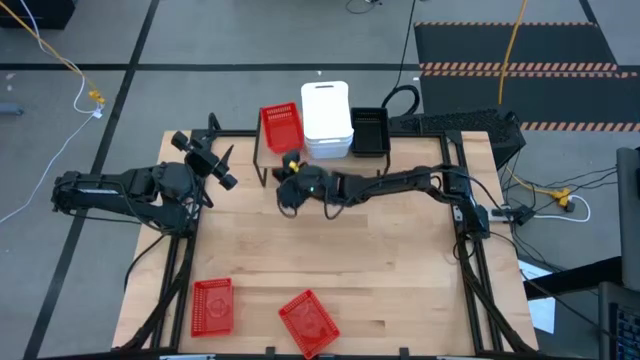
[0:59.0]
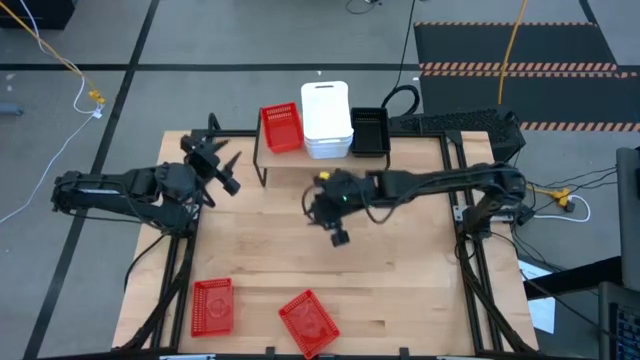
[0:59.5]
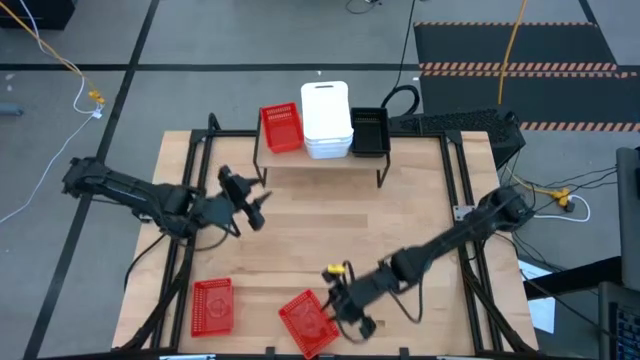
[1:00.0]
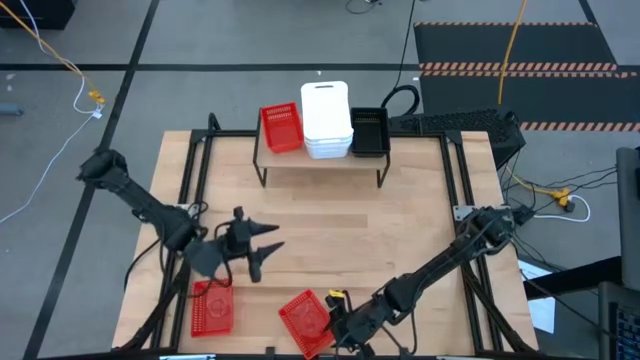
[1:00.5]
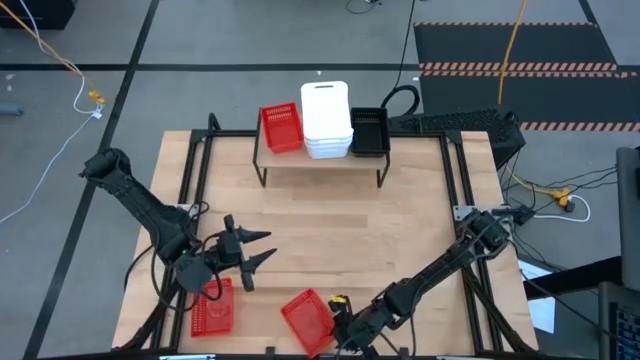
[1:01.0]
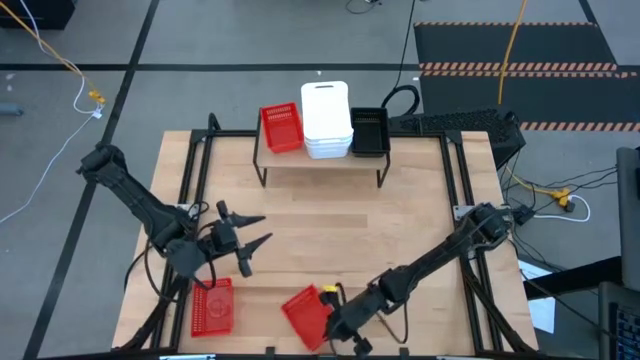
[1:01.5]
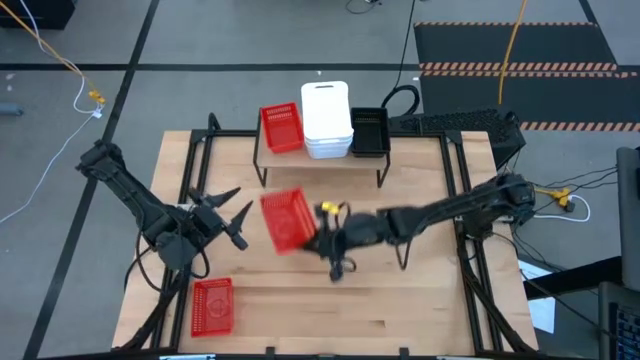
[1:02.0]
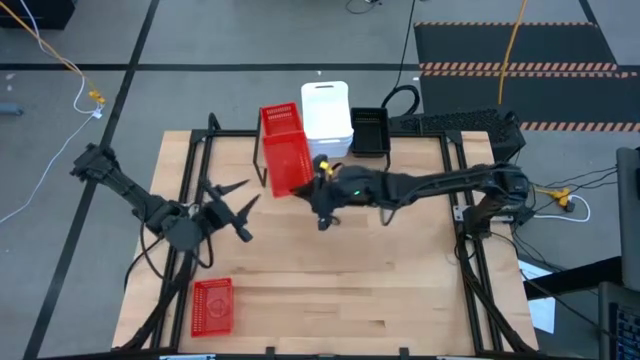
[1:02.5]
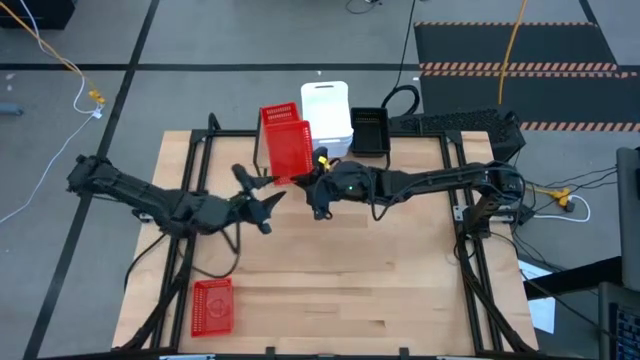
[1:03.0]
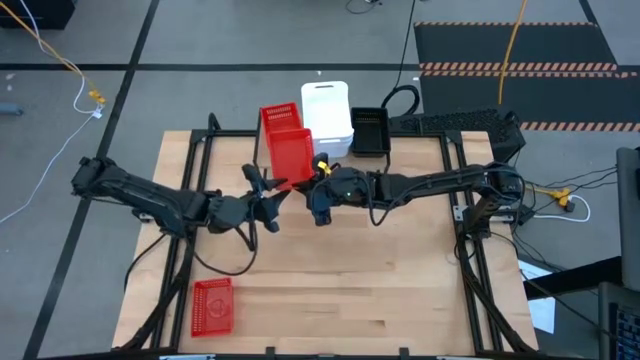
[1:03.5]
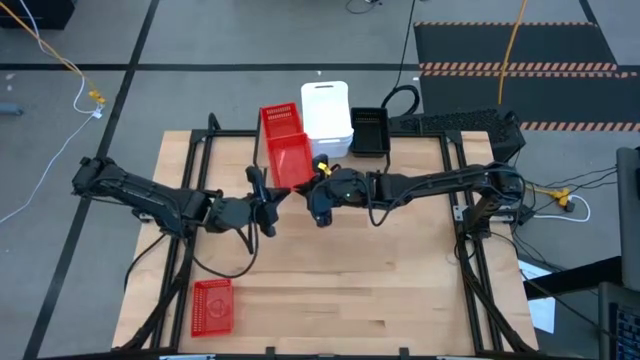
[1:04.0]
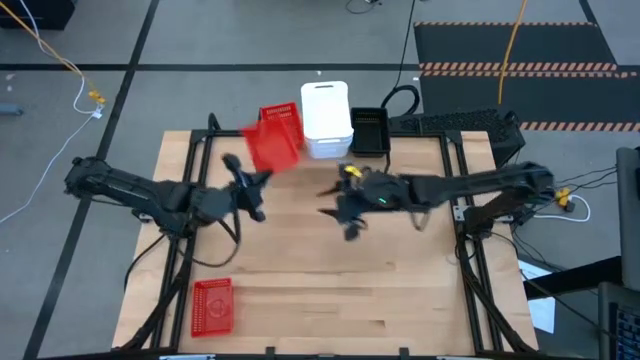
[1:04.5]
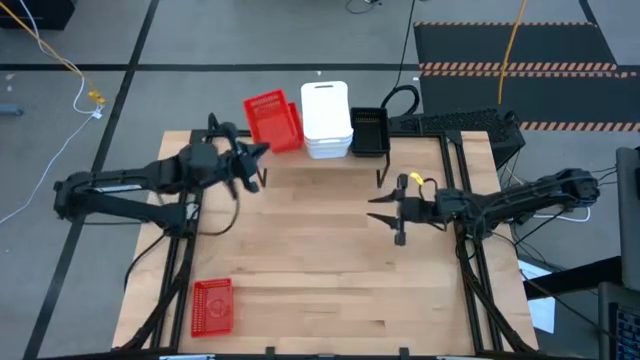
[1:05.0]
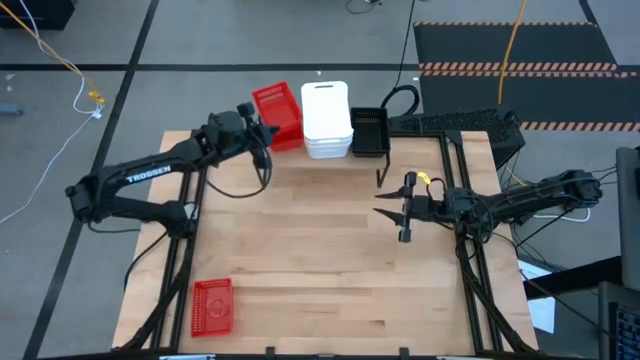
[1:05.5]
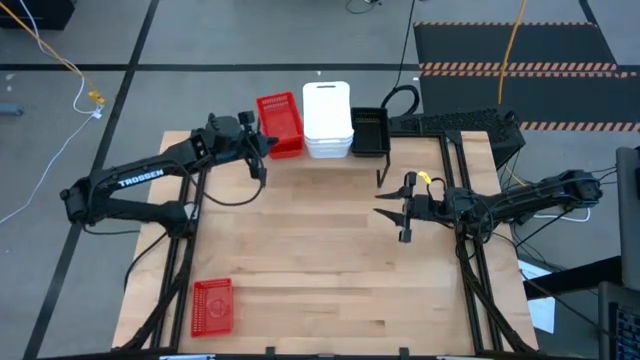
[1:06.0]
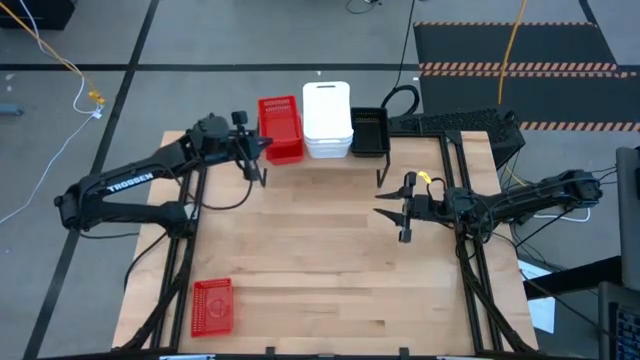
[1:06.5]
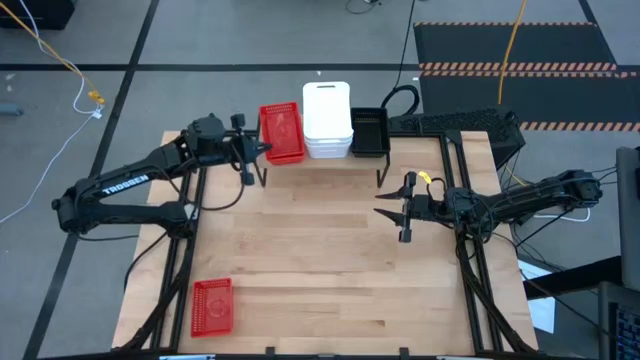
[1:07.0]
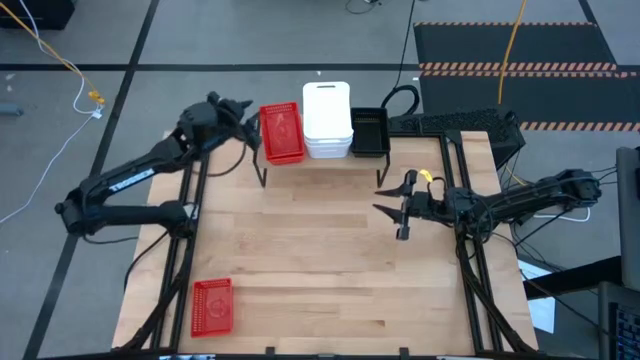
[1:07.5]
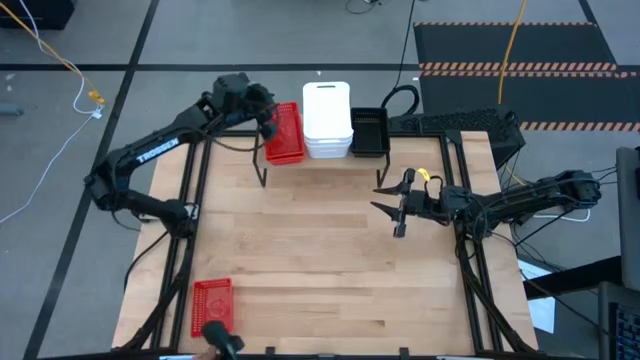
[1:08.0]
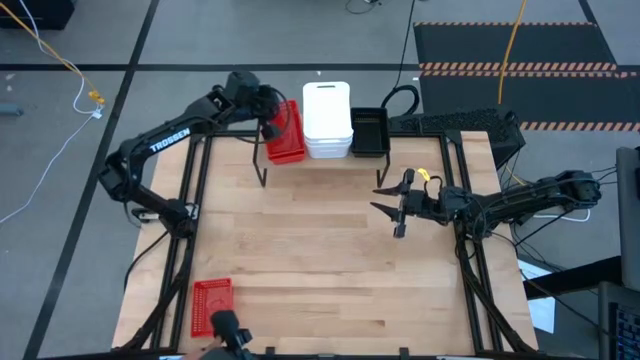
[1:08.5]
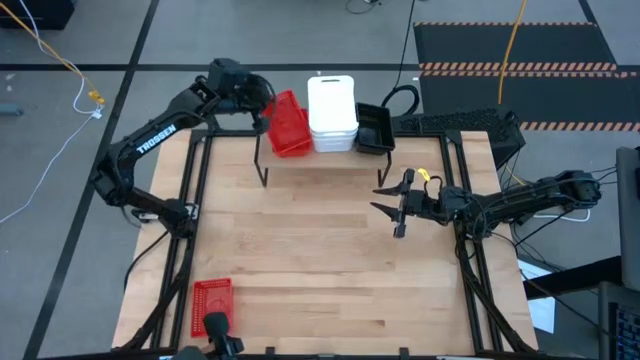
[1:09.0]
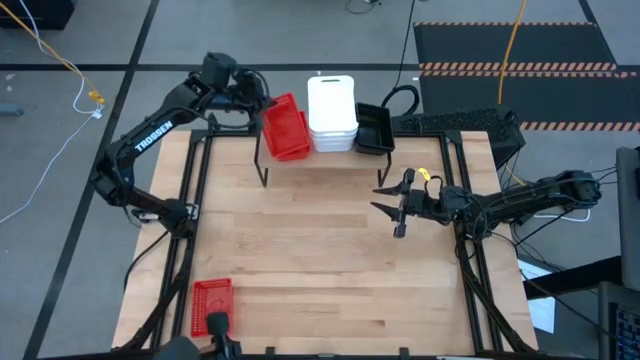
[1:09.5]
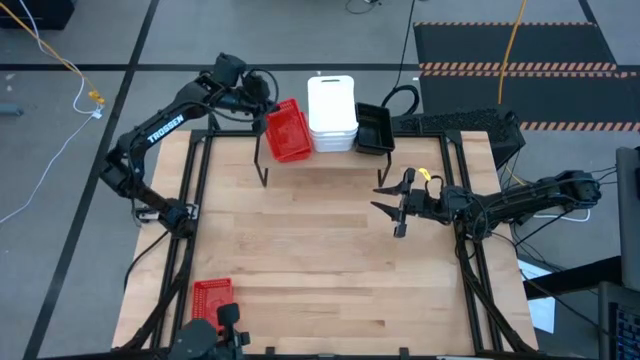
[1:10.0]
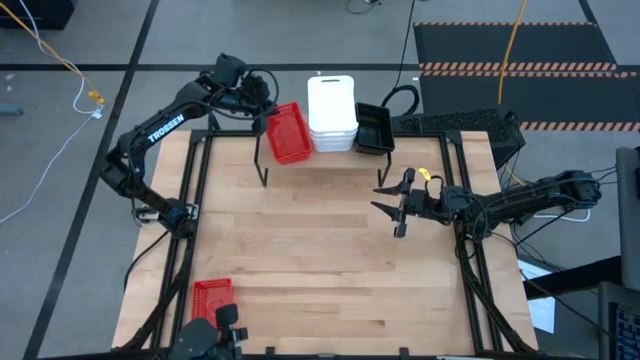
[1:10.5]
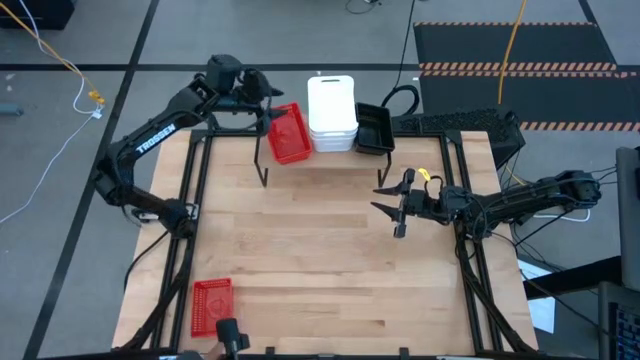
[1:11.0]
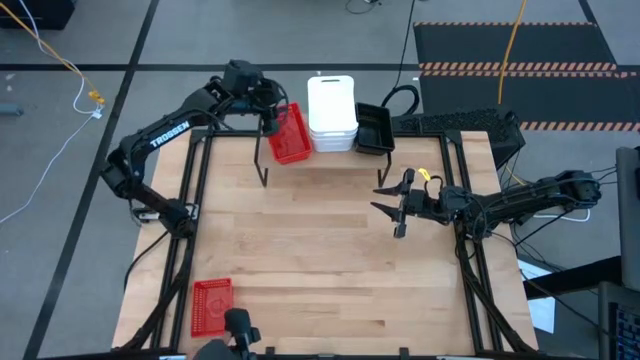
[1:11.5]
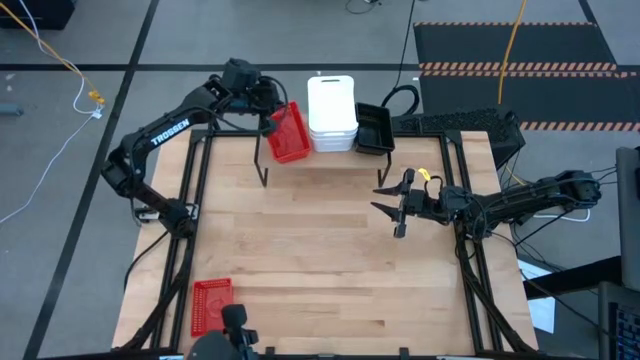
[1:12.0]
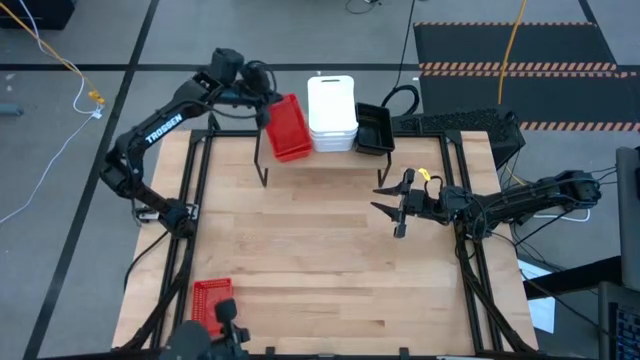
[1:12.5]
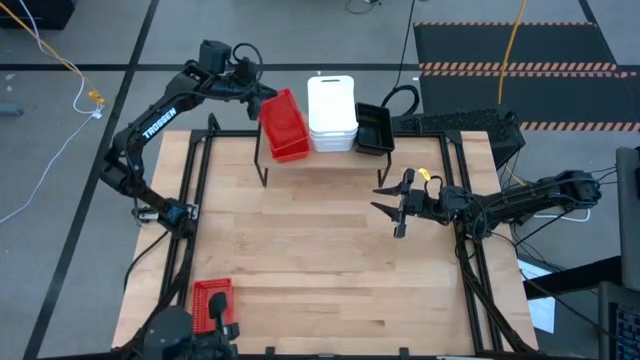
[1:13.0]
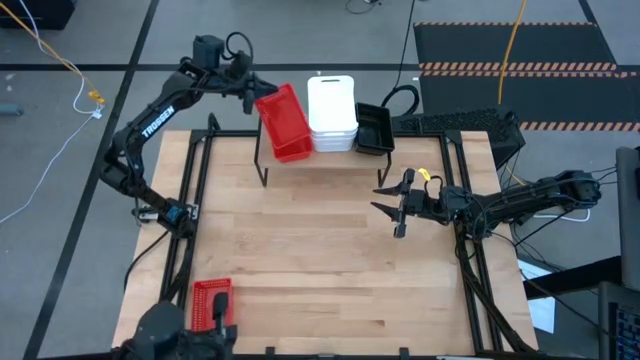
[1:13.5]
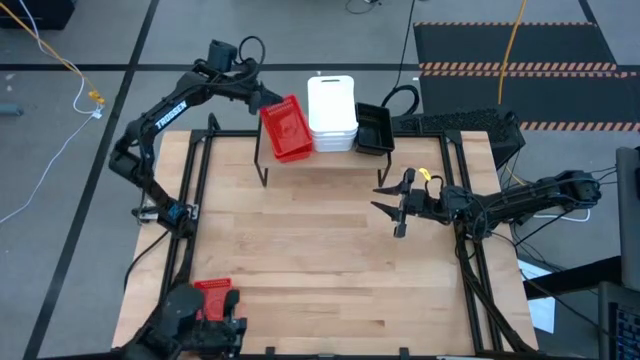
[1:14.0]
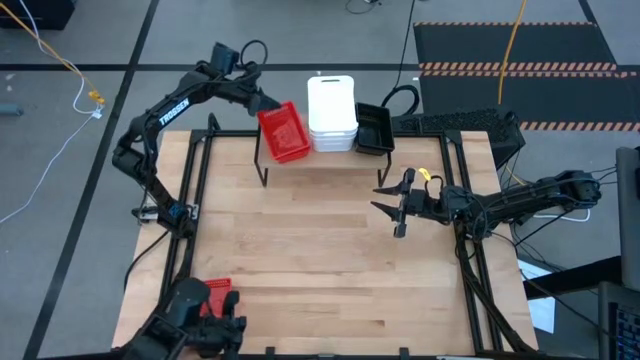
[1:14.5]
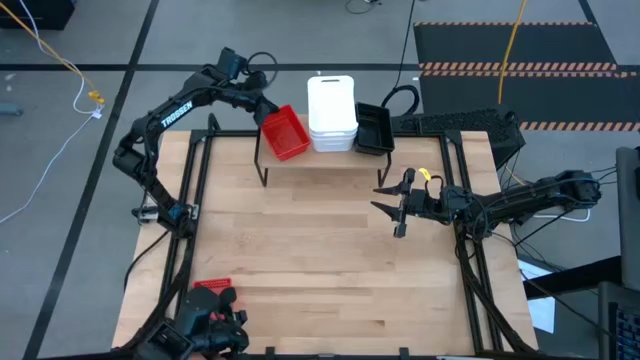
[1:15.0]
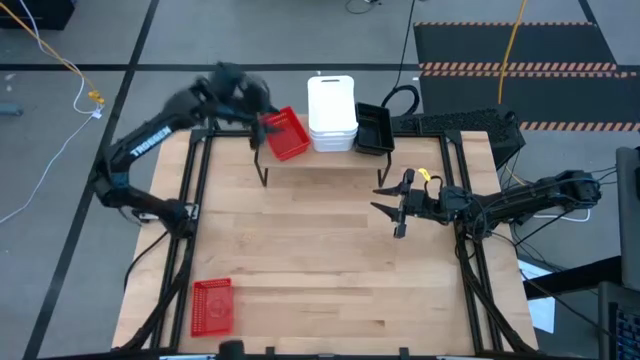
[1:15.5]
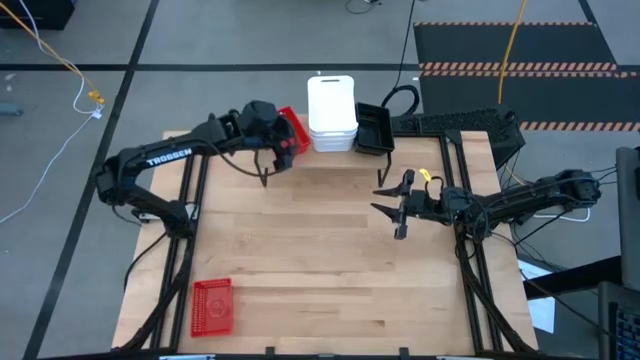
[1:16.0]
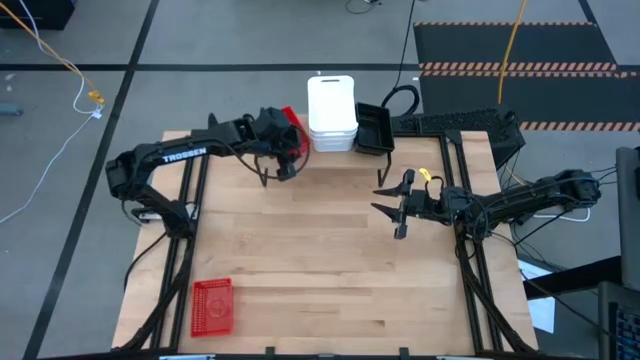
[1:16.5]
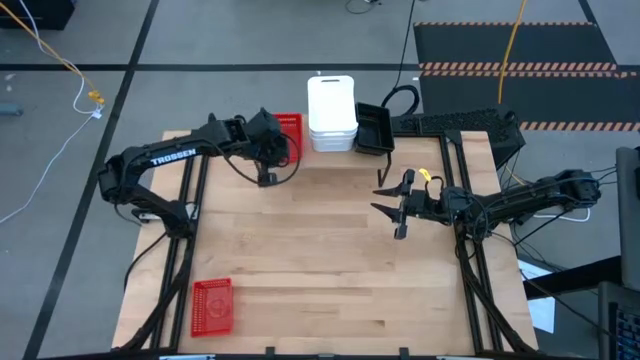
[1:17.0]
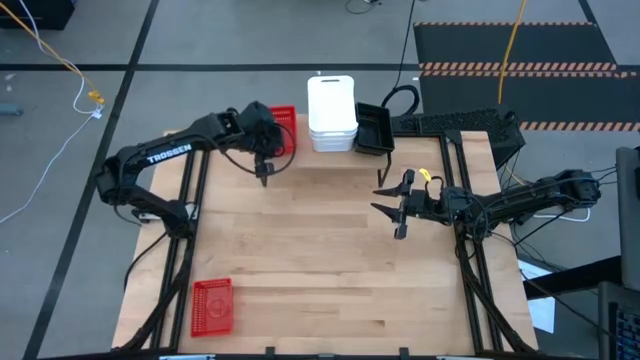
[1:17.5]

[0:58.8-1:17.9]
Task: Stack baskets on shelf by color
Stack the right red bin on the red bin on the shelf

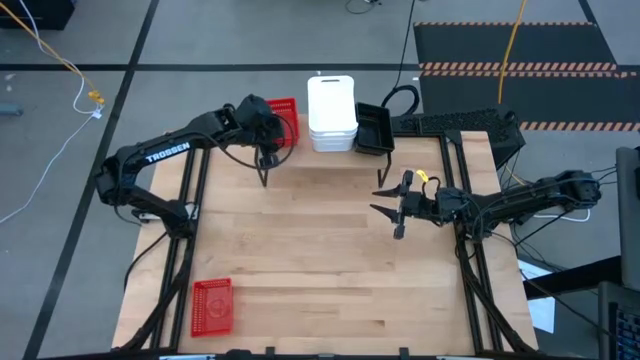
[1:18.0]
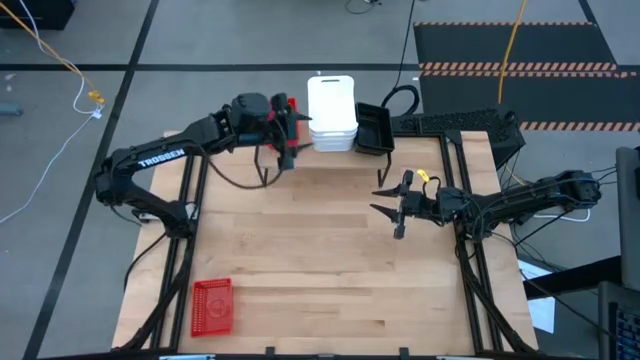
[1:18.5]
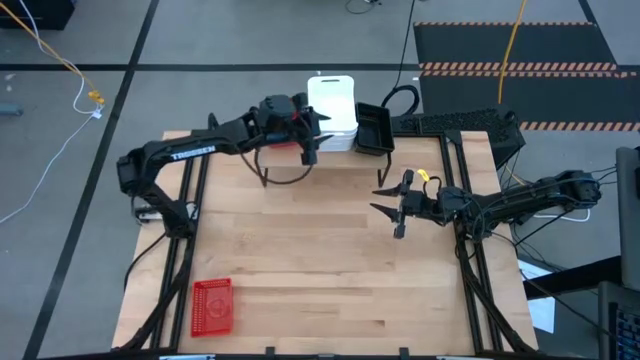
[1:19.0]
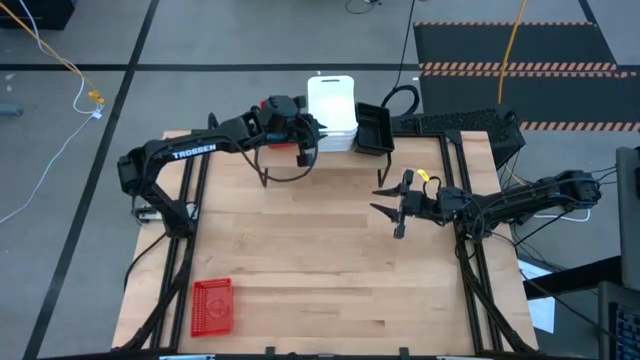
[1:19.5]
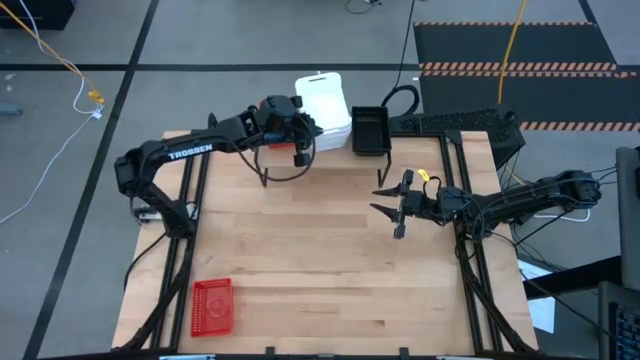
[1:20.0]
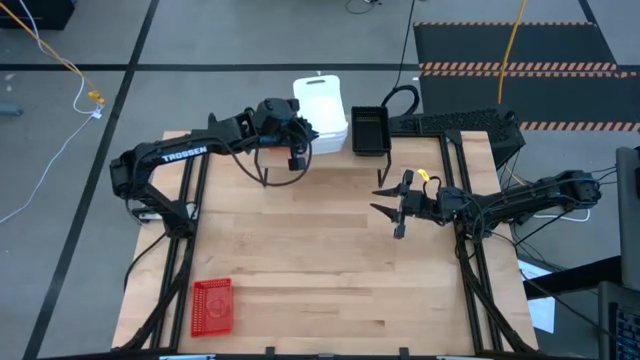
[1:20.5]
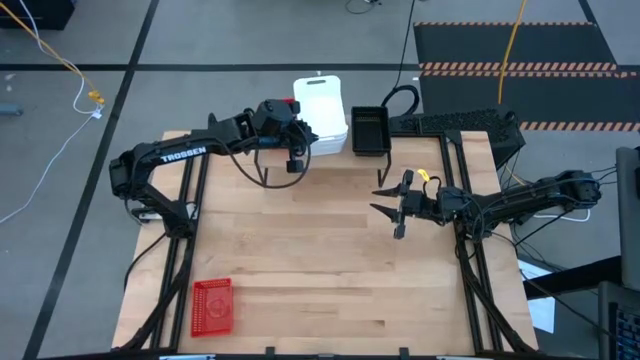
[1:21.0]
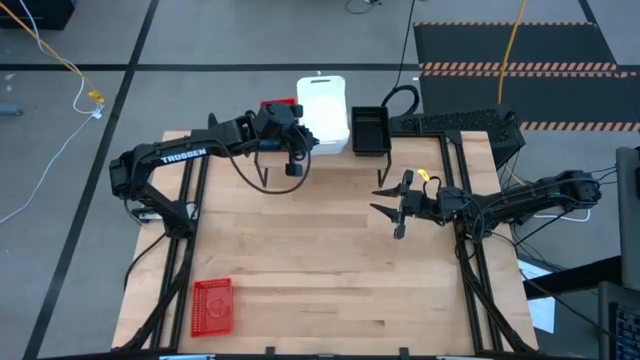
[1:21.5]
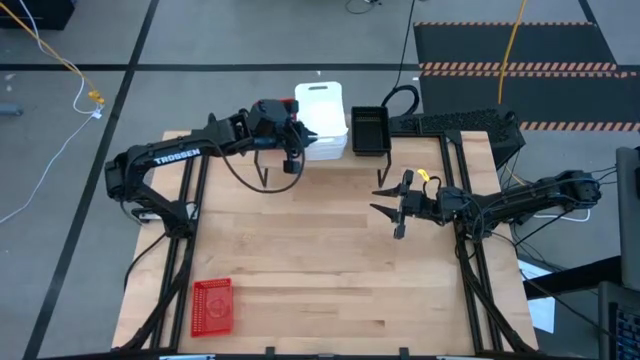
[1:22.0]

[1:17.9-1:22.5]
Adjust the stacked white bins on the shelf
